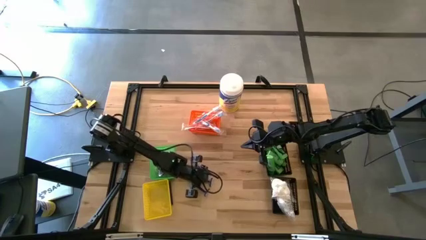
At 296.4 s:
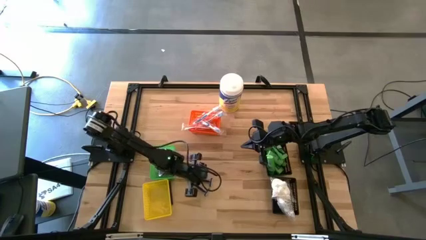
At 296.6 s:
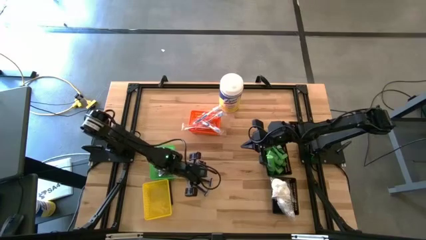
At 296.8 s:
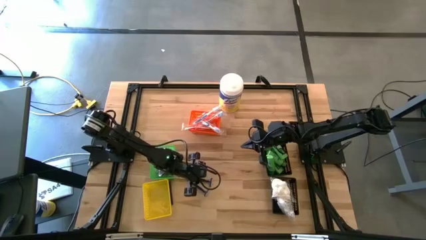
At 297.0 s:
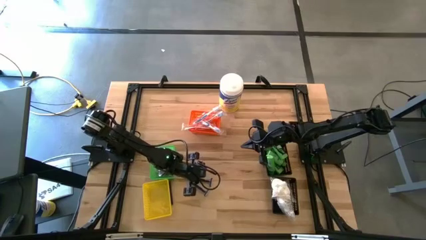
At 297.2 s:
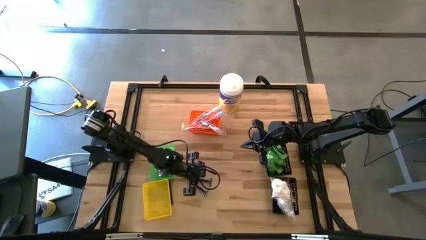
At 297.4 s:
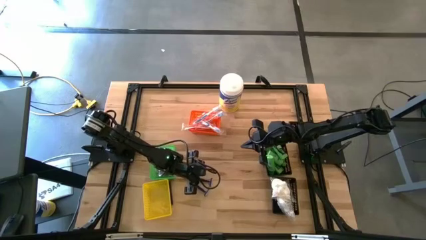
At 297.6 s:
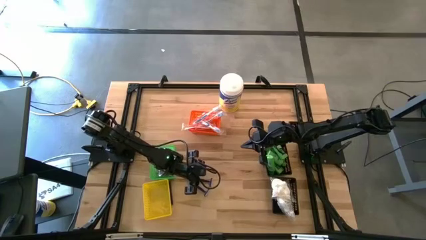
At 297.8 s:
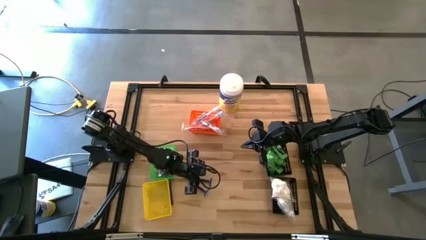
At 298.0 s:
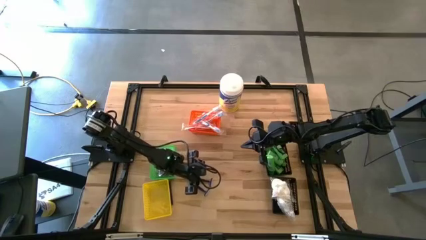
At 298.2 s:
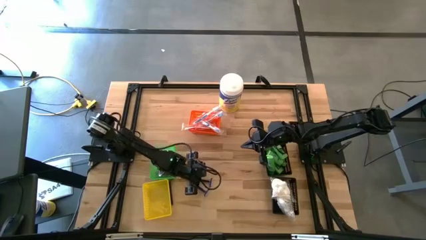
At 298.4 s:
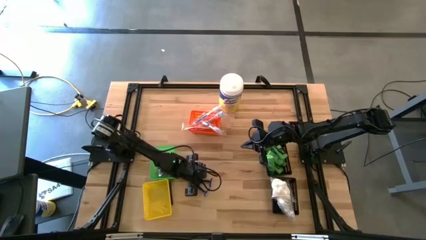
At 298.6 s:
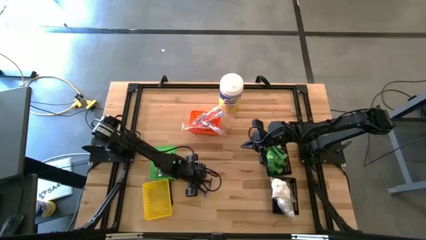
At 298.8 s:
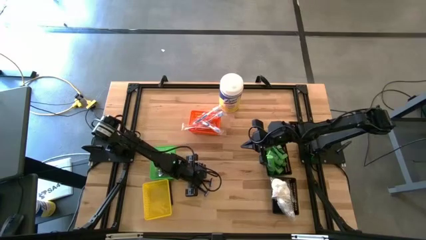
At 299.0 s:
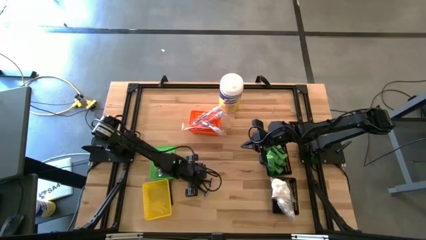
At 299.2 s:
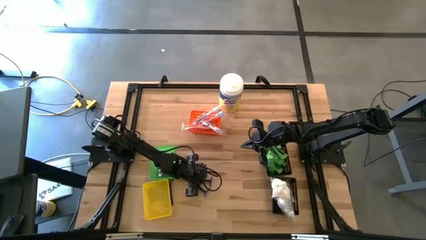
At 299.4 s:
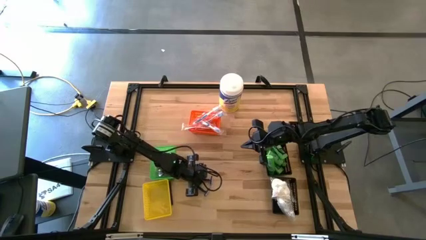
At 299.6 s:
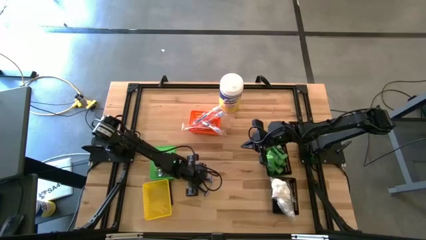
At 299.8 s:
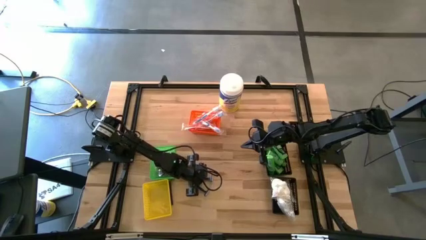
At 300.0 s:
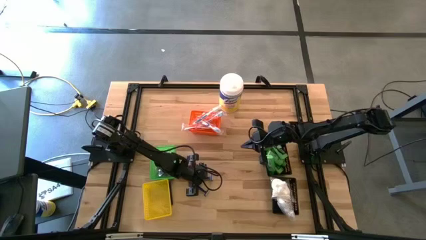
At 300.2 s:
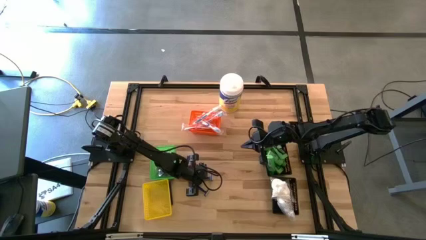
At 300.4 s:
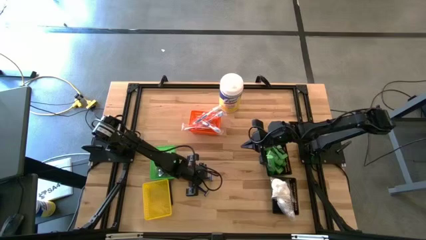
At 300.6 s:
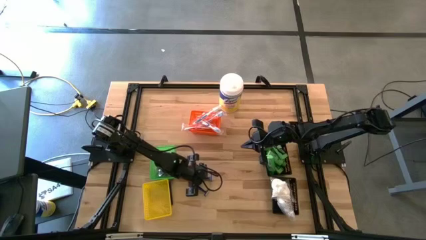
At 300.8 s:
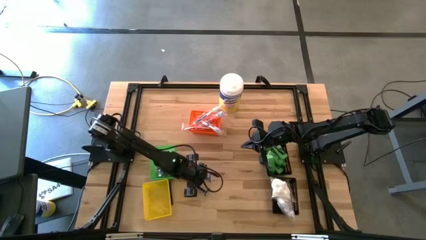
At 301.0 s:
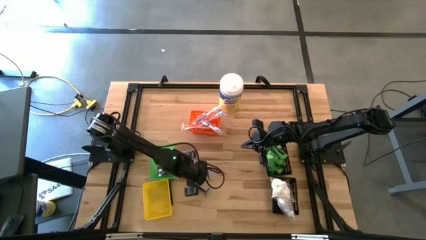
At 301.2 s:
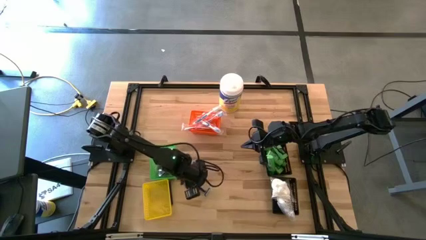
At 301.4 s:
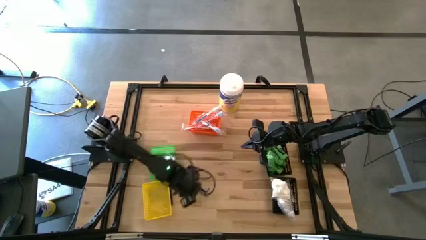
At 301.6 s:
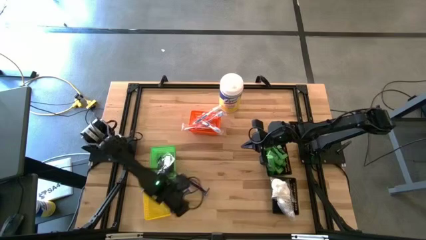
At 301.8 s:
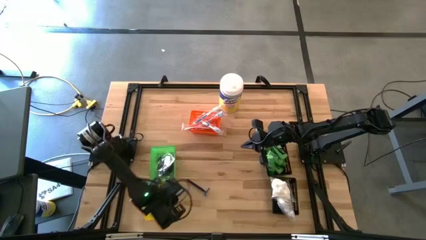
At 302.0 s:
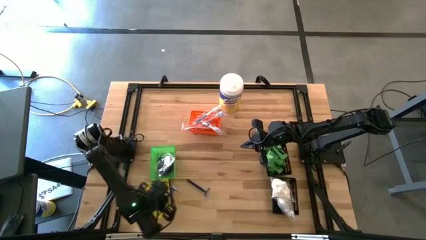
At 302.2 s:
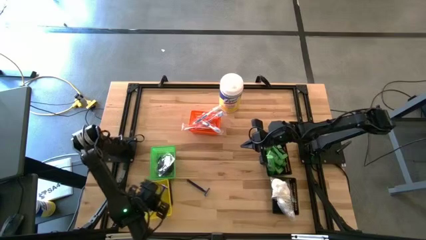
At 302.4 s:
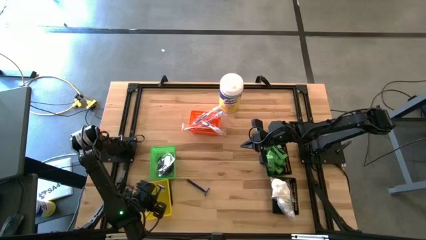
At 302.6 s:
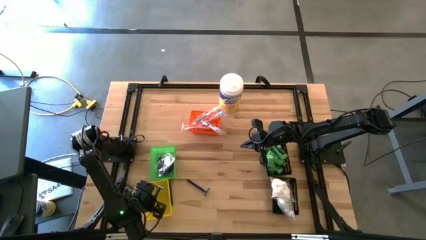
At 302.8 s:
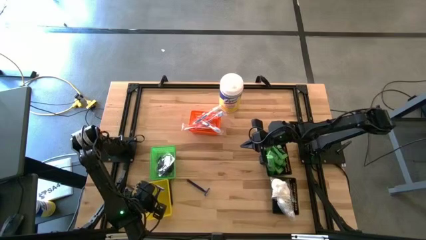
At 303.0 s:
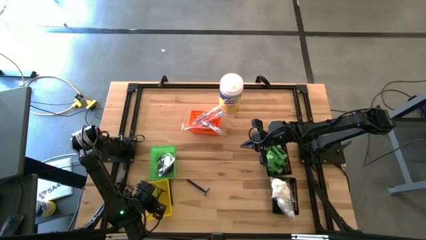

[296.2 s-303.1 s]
Task: Pick & Place Travel size toiletries
Put the blue razor into the yellow bin

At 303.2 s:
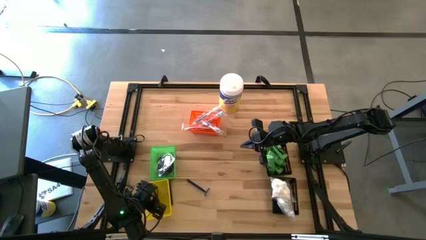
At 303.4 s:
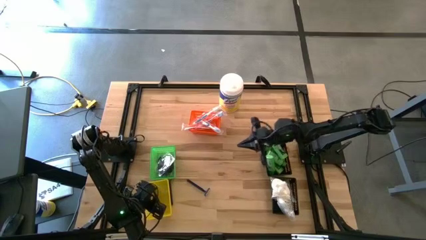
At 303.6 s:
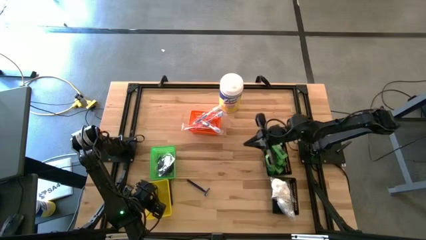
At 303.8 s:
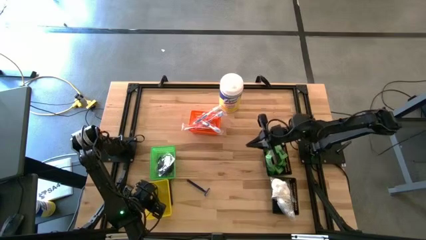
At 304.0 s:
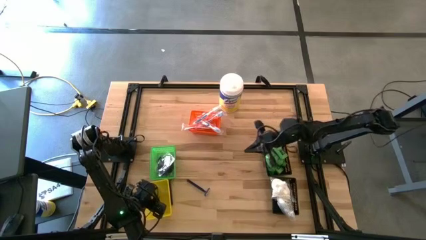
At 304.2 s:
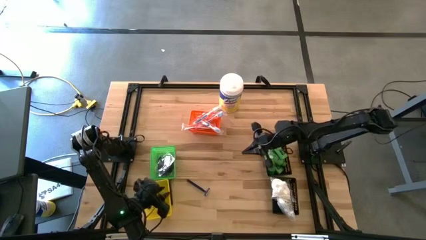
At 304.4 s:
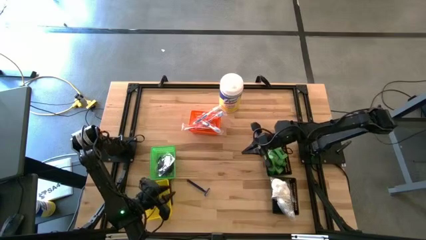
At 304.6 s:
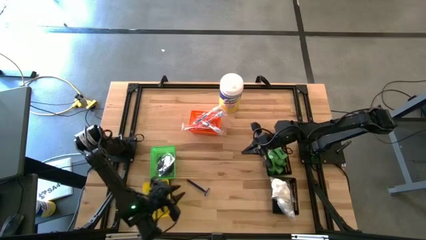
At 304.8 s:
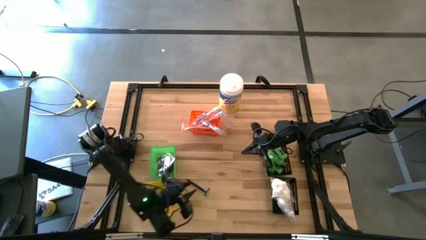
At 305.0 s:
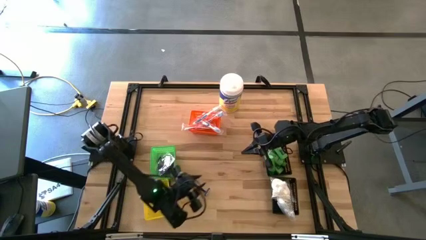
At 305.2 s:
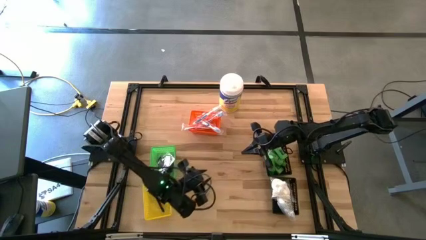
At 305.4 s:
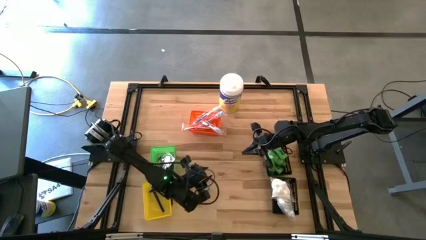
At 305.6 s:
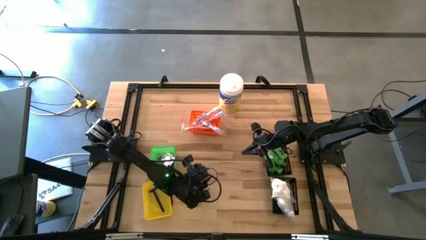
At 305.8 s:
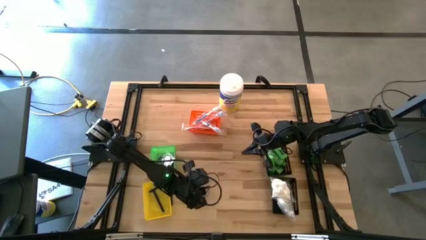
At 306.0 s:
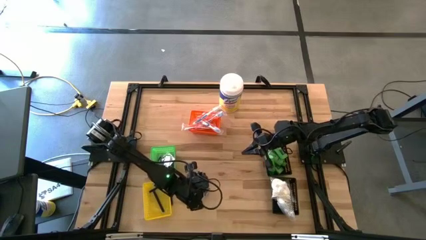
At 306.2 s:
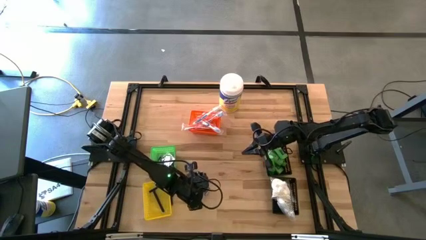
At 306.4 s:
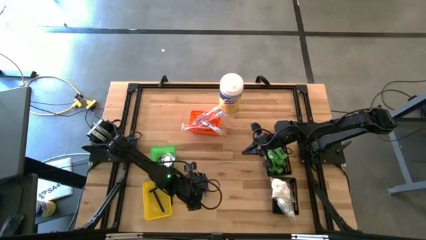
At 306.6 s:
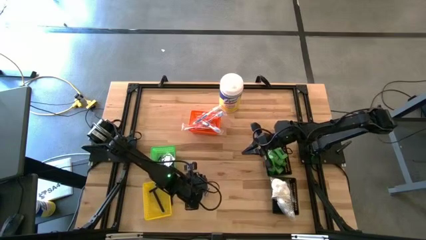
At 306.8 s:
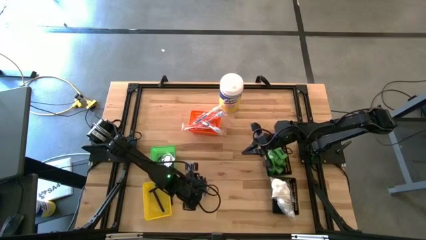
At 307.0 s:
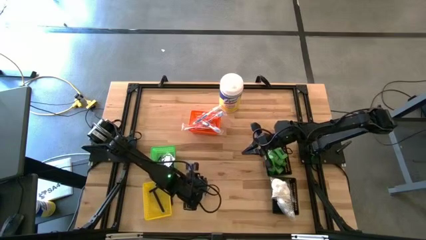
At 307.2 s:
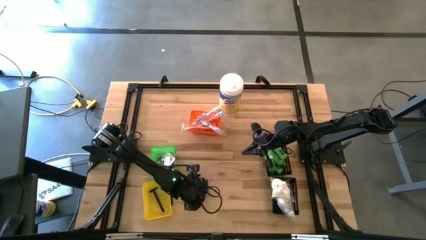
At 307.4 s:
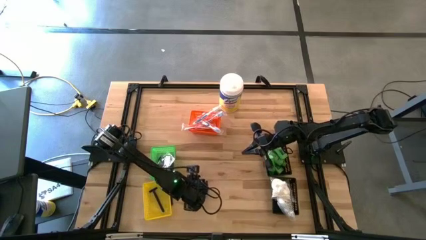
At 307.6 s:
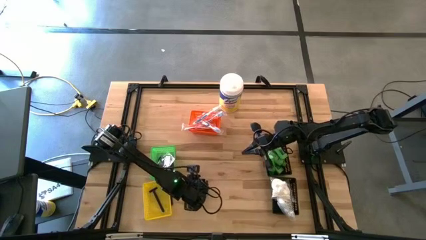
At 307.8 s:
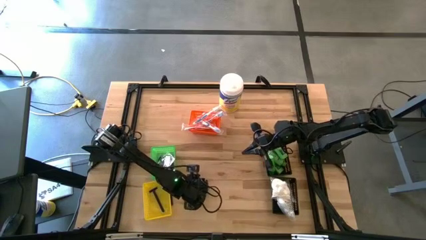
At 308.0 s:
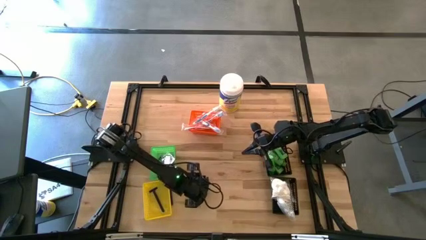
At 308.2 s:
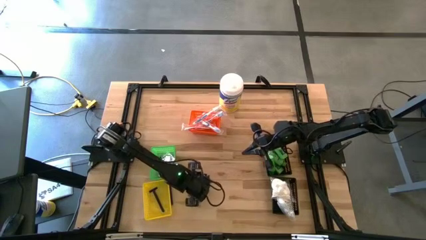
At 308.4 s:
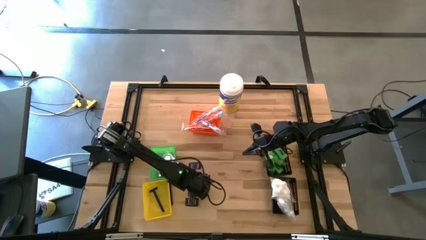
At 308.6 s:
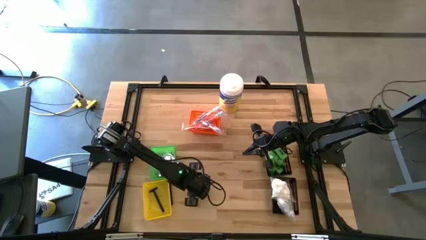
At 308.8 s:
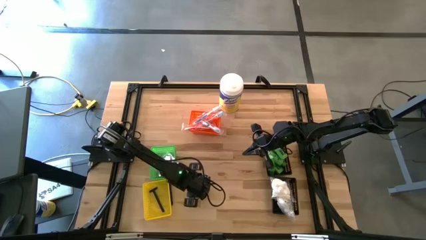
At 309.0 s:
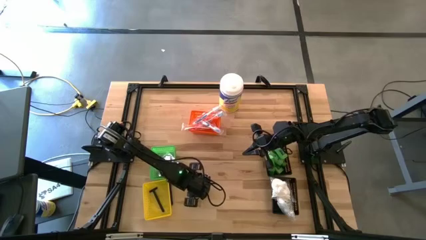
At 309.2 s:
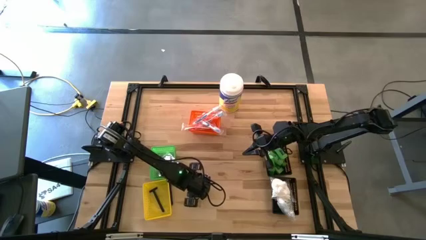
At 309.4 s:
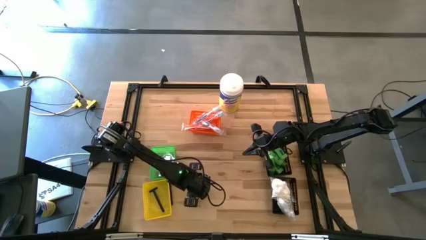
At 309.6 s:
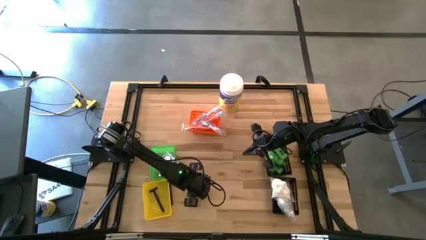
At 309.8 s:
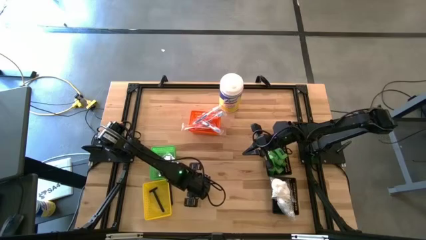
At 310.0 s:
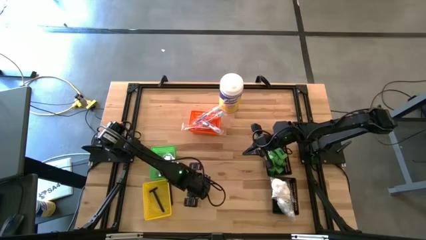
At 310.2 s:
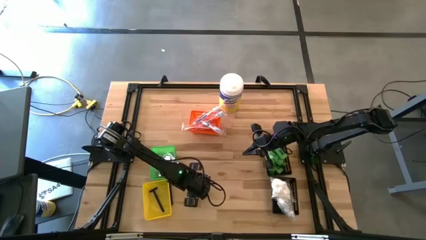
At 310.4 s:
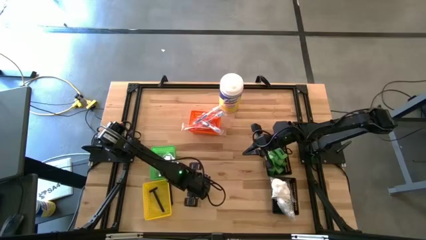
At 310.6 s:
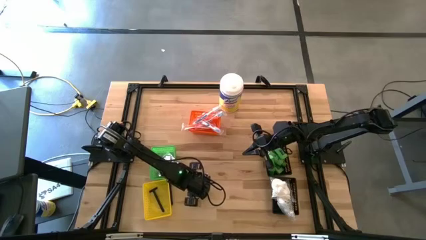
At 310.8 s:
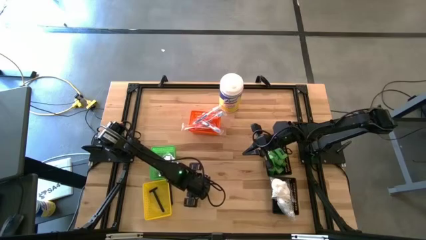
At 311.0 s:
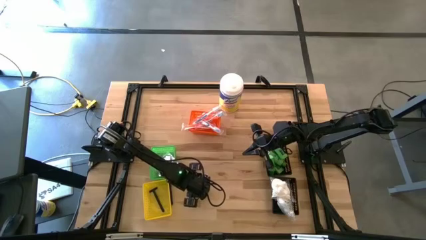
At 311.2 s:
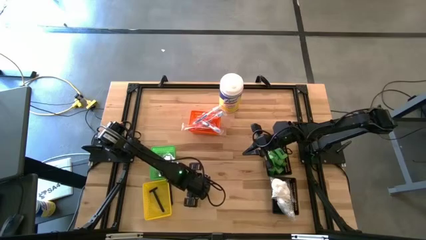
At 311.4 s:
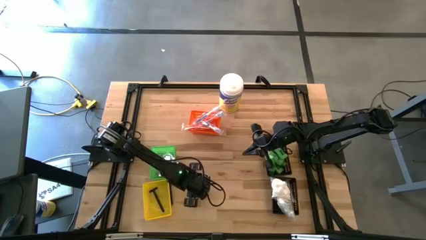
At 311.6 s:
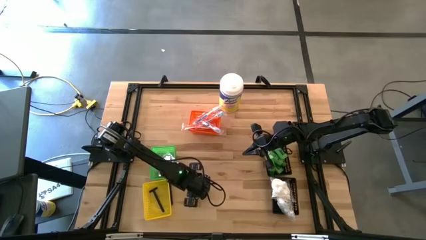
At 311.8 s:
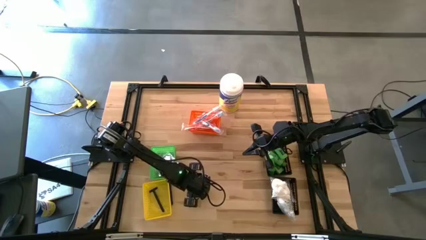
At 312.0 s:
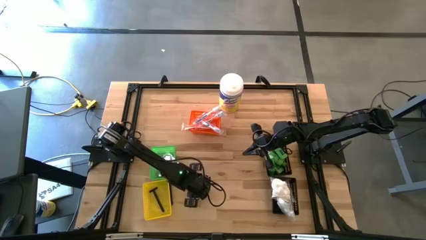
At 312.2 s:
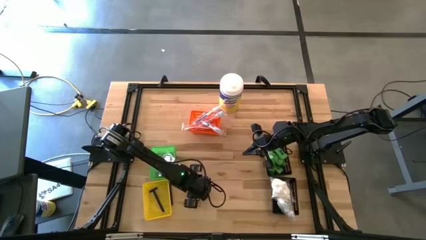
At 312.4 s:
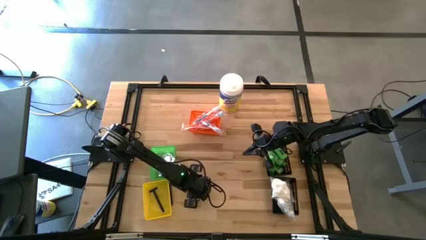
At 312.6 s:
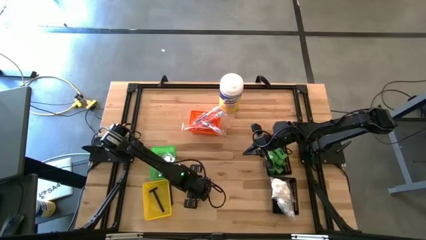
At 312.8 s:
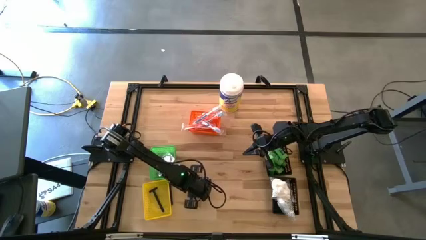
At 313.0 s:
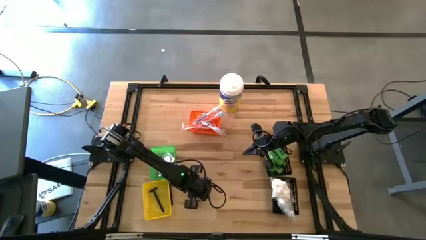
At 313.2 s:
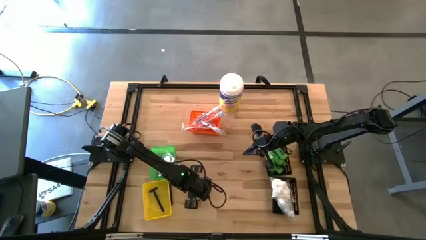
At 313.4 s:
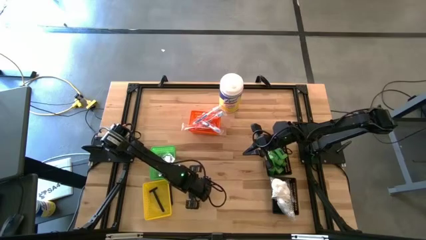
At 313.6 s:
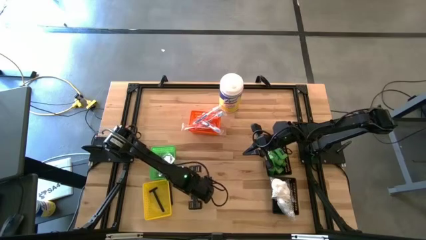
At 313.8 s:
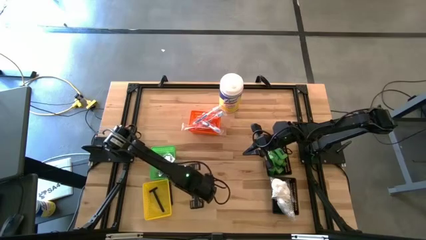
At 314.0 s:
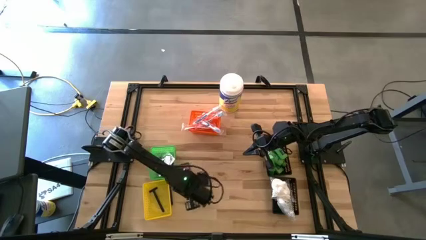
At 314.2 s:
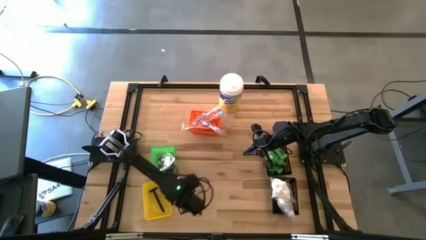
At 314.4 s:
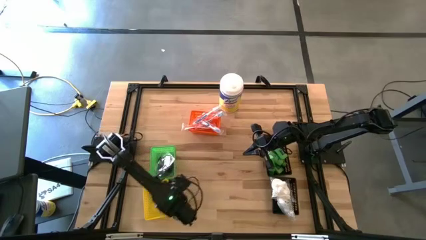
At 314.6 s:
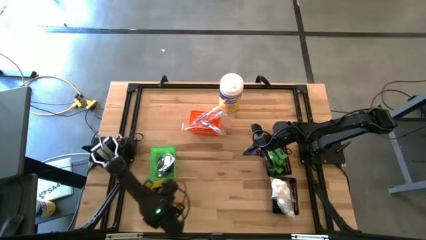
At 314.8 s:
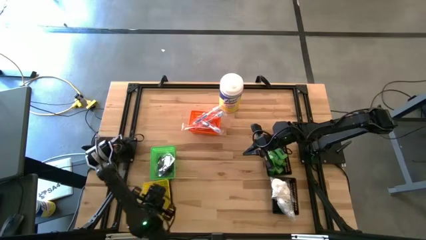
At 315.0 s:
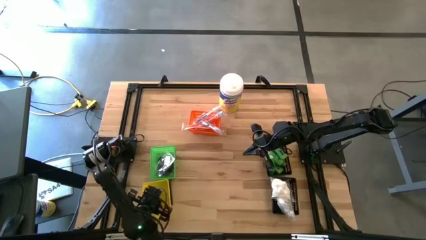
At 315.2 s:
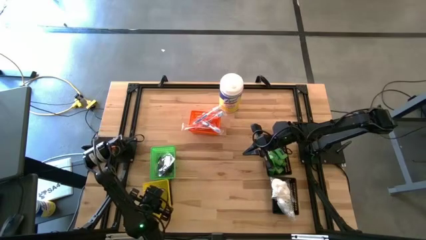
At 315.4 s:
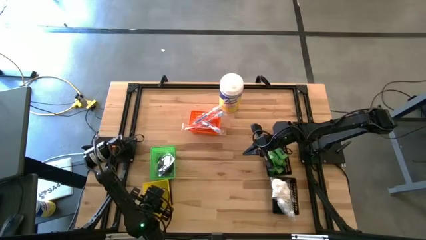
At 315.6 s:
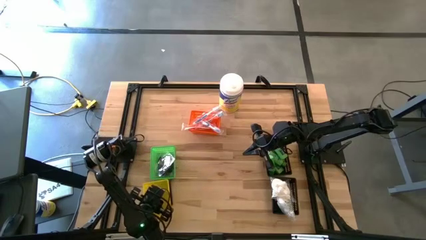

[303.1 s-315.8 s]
Put the blue razor into the yellow bin
